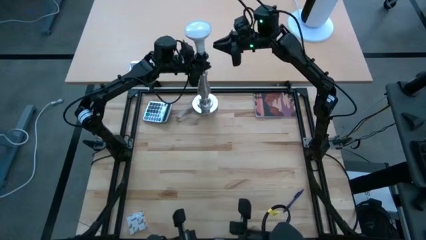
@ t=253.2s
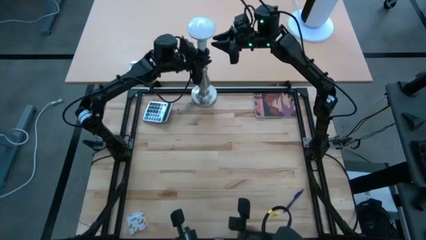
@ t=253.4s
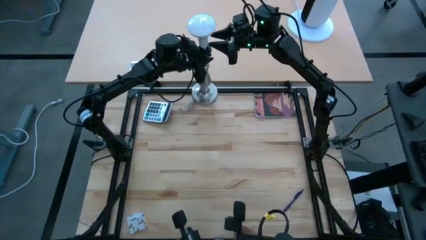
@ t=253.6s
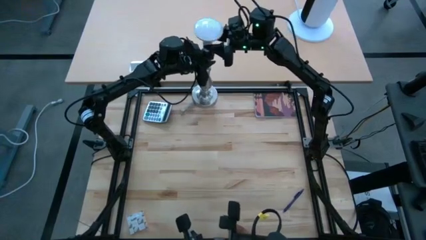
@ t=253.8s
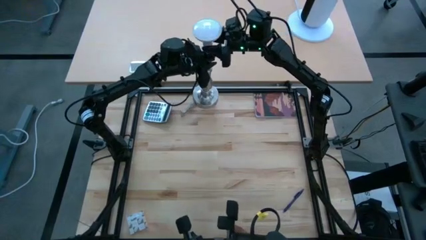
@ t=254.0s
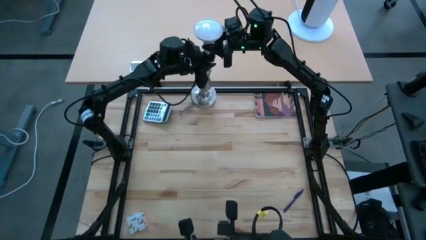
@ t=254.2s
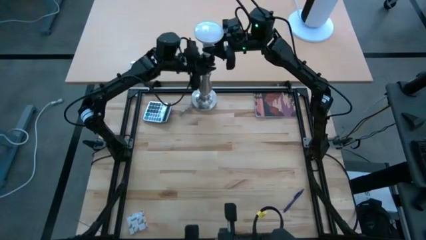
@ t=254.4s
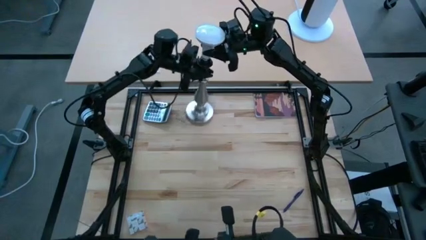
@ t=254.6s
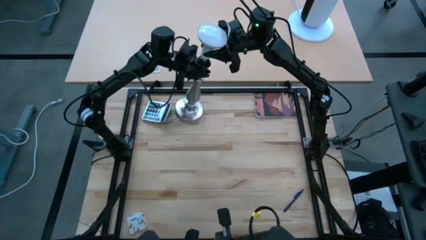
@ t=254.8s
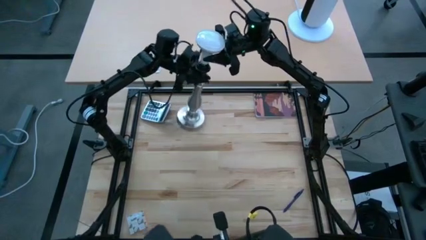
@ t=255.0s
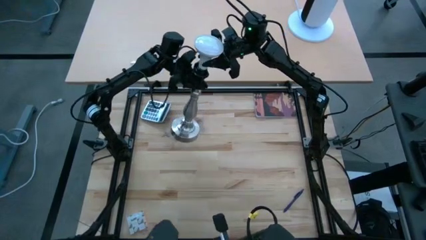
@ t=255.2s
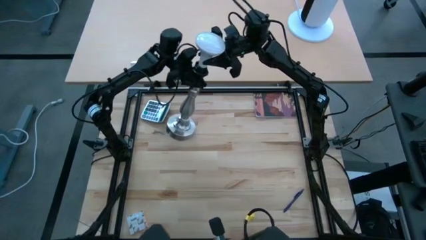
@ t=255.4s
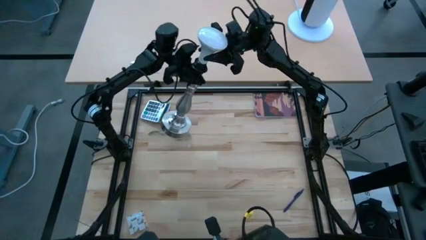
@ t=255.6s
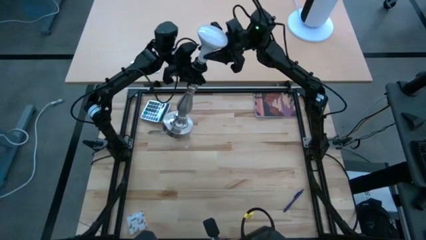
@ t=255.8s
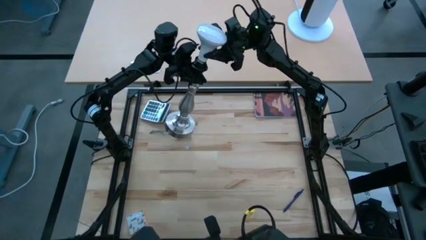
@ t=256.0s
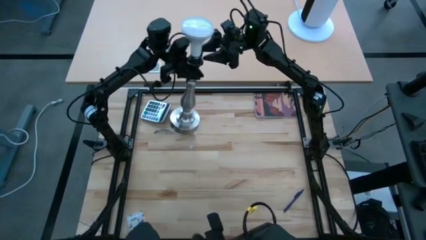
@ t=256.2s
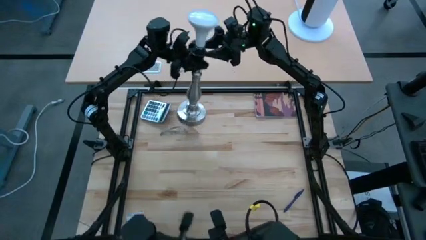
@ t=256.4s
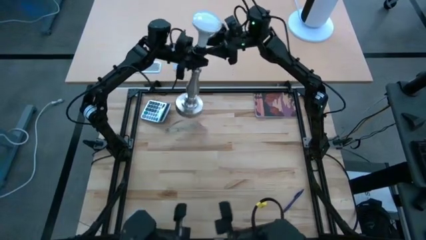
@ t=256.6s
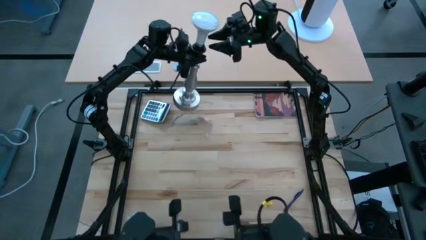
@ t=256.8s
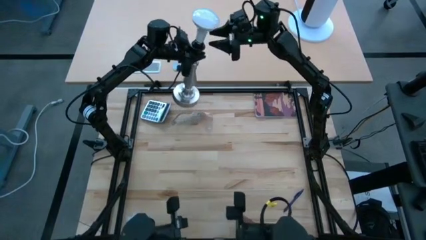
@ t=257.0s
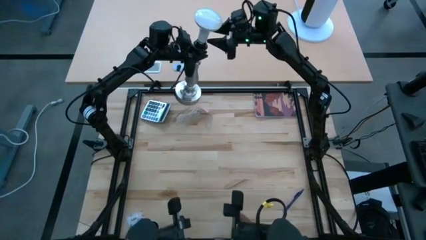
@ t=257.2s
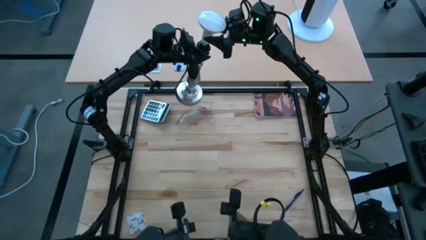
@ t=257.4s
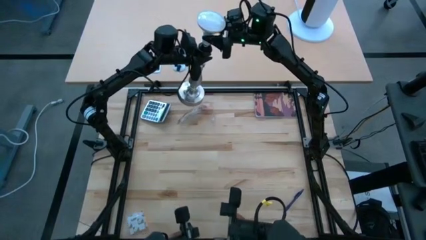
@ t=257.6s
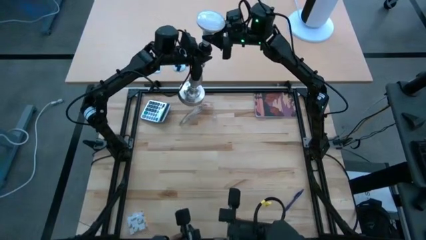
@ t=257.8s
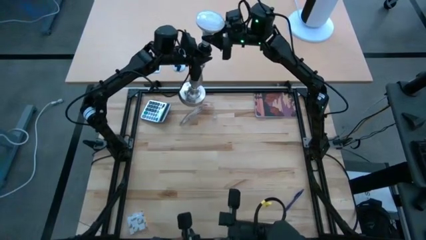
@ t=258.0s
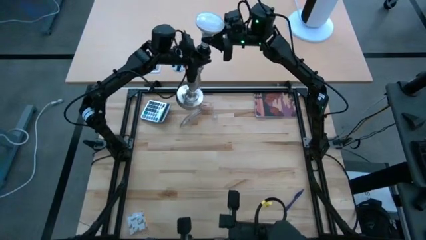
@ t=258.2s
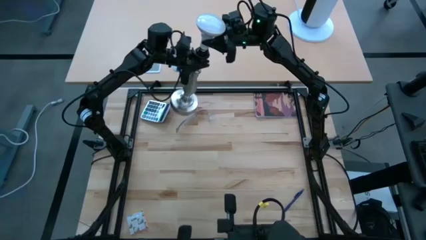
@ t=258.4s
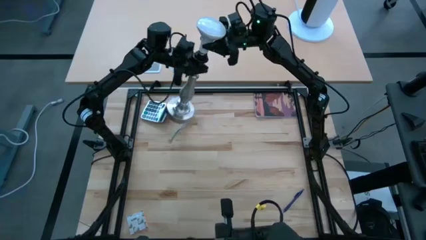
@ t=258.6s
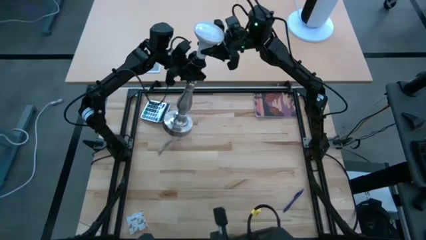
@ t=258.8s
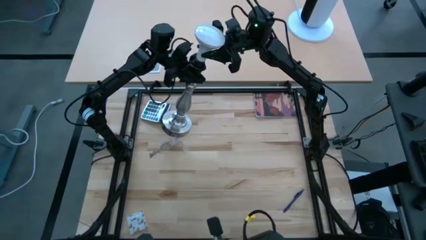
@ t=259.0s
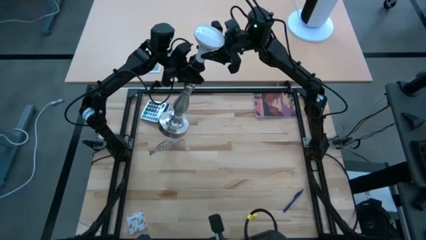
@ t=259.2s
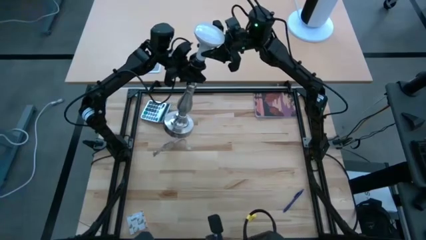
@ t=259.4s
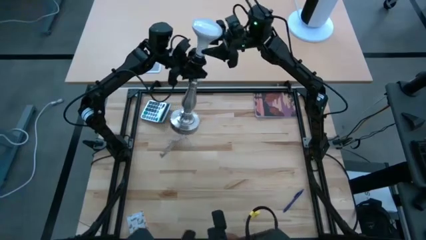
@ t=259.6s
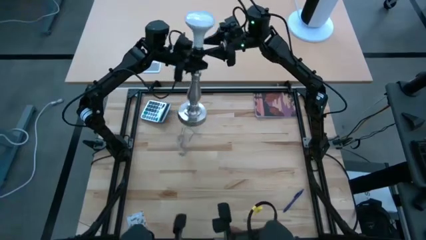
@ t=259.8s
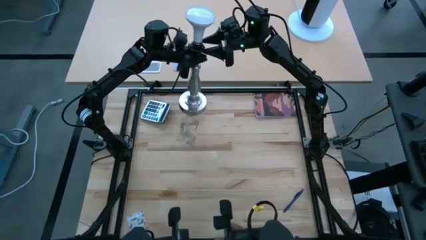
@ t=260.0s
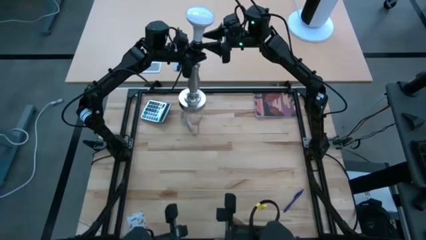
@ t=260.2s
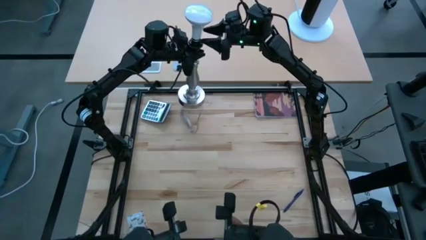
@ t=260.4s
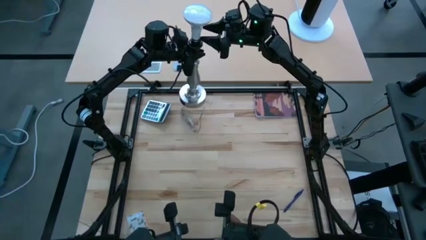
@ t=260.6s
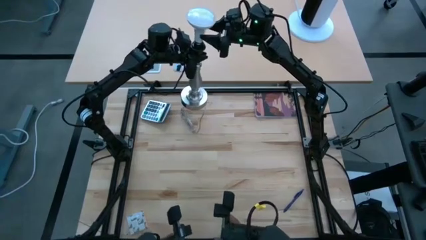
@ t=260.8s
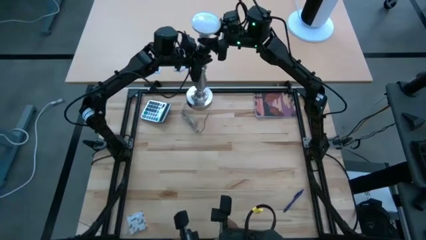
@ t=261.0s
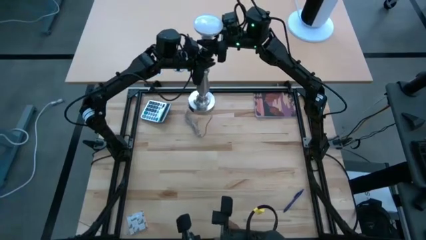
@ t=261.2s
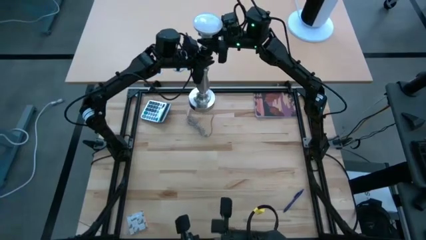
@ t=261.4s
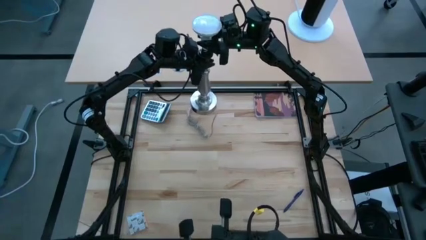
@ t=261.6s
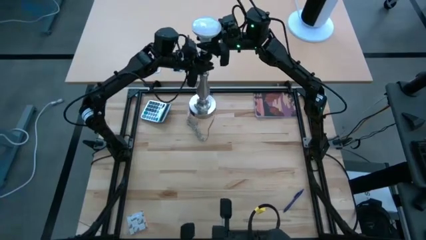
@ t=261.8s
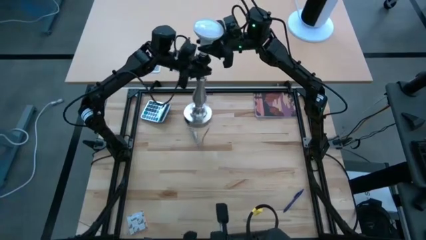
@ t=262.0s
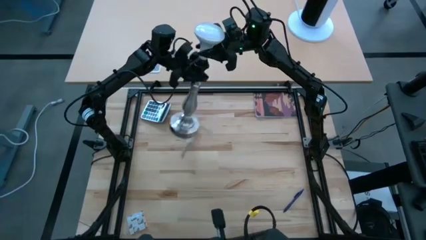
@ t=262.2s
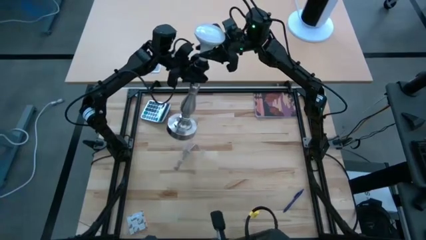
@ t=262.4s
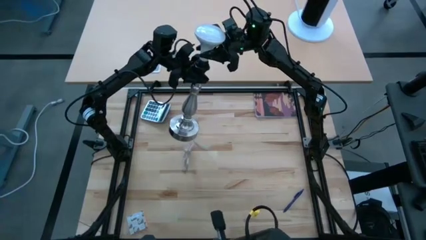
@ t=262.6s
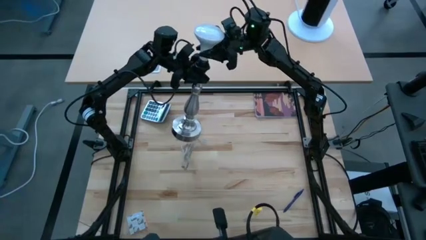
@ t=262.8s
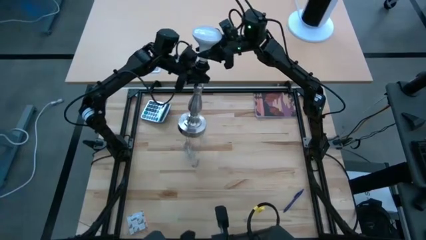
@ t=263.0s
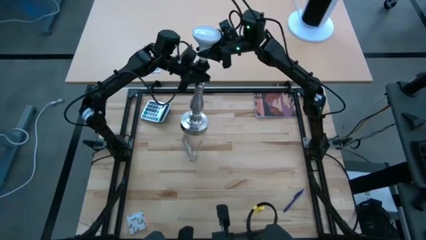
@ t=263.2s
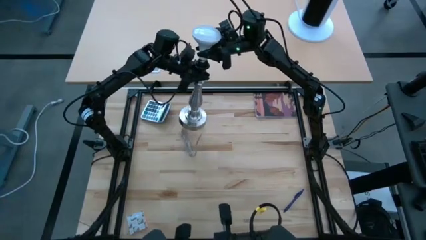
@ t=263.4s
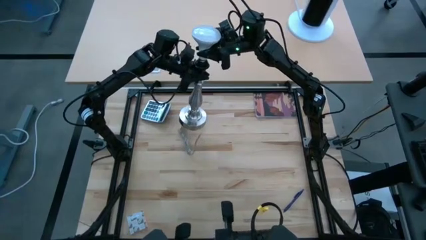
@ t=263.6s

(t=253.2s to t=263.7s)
Task: Screw lightbulb
Remove the lightbulb from the table lamp

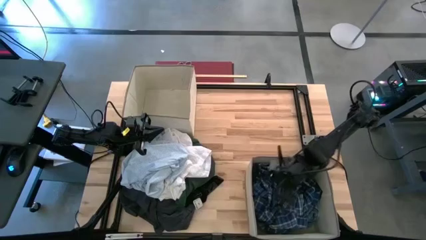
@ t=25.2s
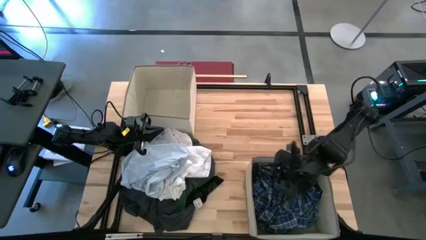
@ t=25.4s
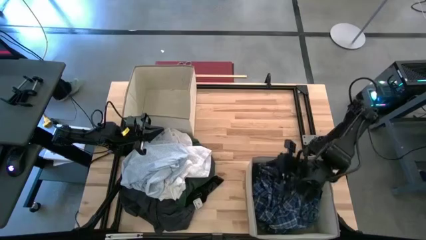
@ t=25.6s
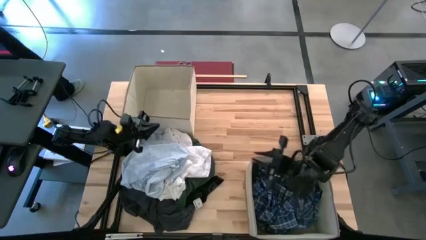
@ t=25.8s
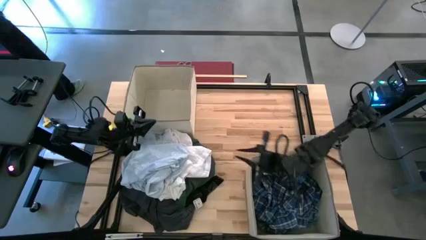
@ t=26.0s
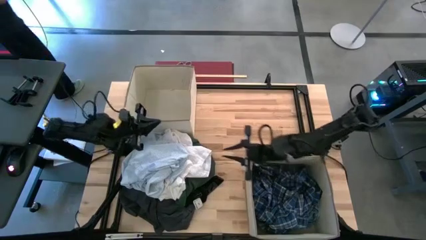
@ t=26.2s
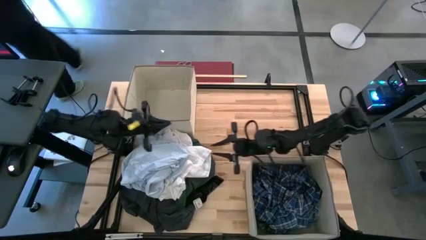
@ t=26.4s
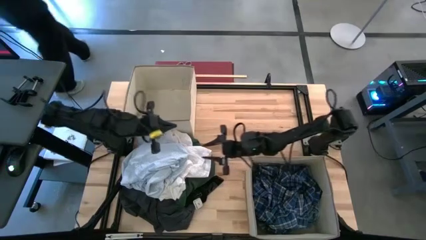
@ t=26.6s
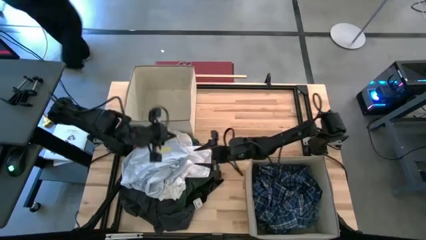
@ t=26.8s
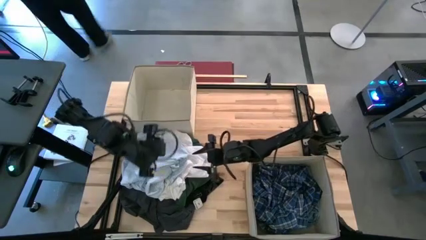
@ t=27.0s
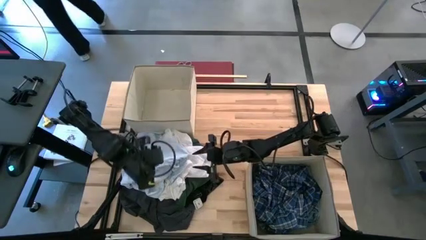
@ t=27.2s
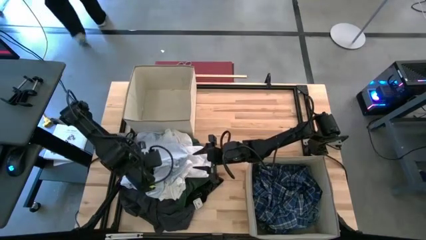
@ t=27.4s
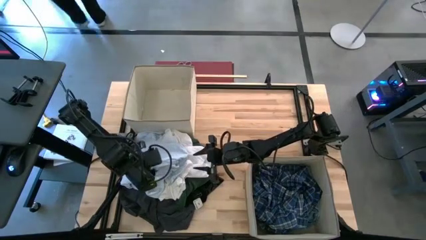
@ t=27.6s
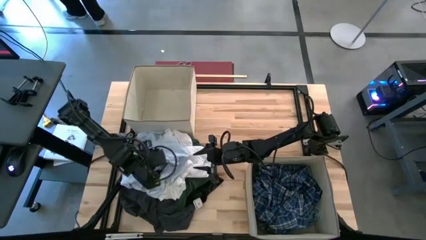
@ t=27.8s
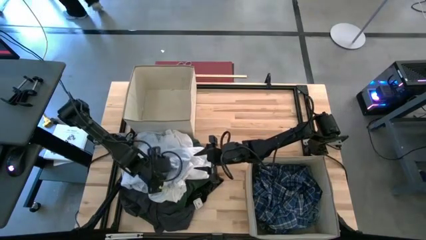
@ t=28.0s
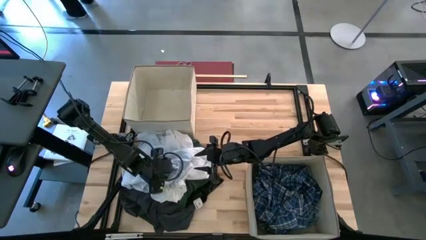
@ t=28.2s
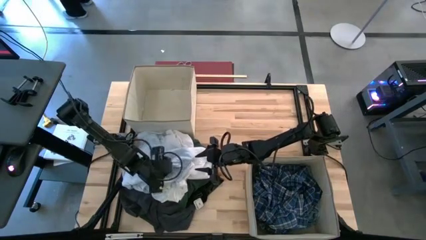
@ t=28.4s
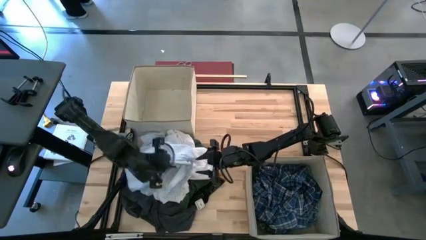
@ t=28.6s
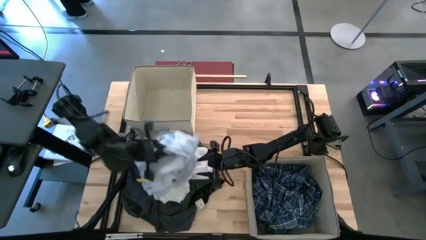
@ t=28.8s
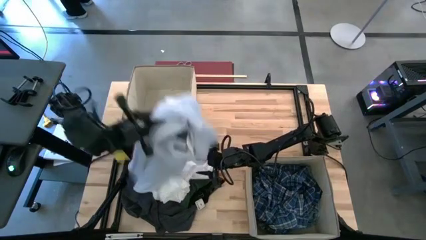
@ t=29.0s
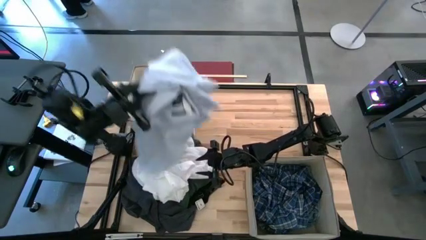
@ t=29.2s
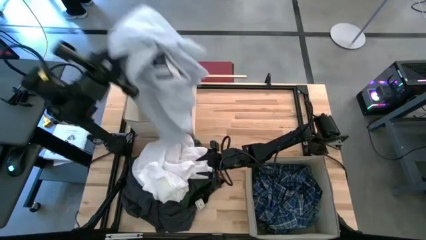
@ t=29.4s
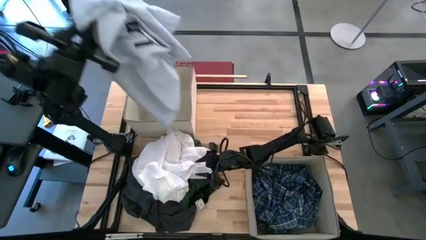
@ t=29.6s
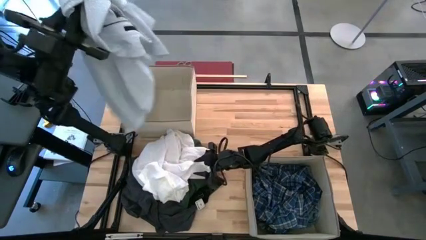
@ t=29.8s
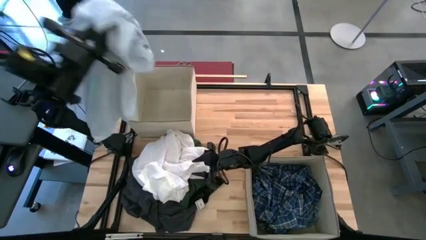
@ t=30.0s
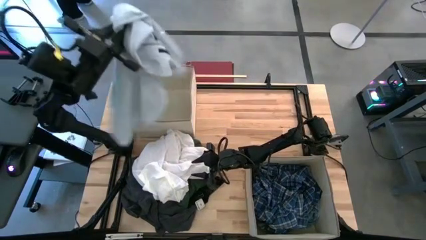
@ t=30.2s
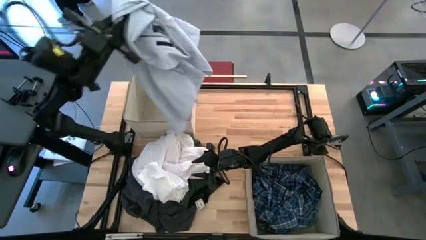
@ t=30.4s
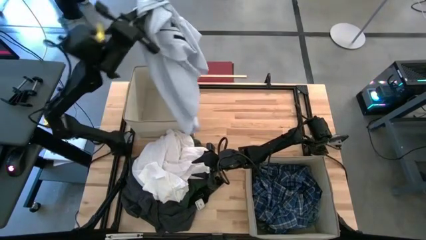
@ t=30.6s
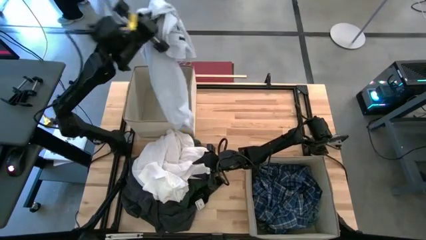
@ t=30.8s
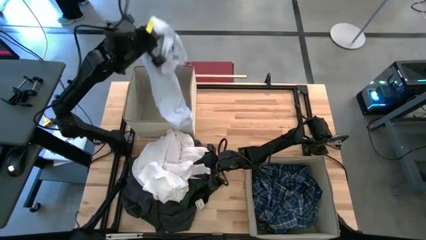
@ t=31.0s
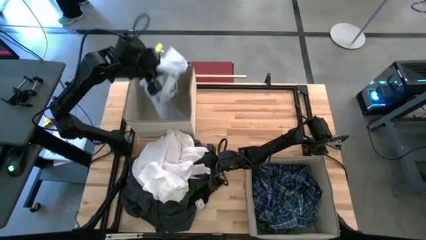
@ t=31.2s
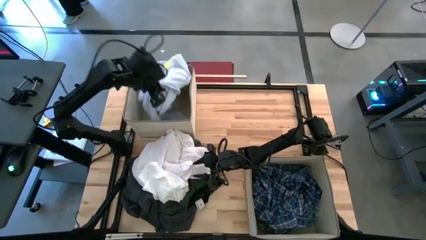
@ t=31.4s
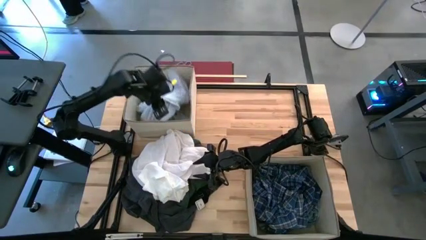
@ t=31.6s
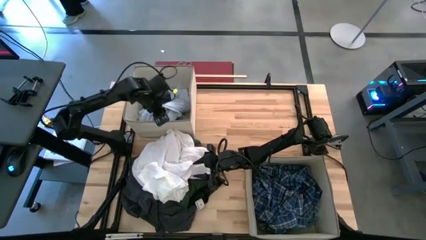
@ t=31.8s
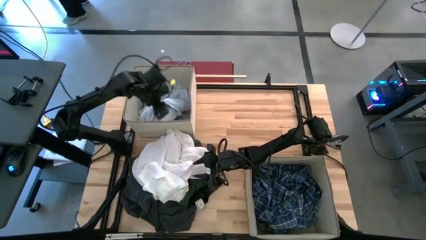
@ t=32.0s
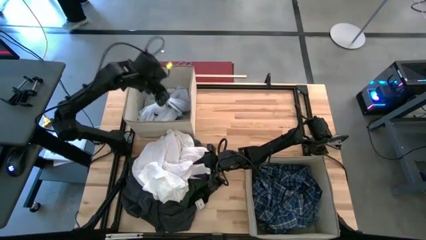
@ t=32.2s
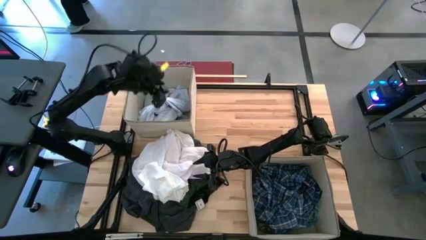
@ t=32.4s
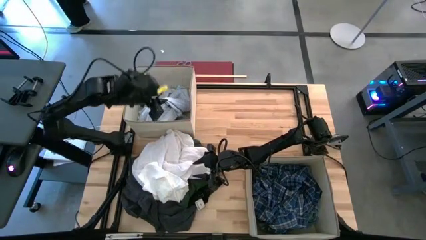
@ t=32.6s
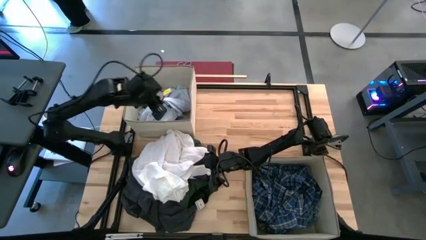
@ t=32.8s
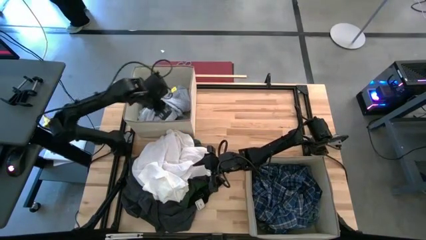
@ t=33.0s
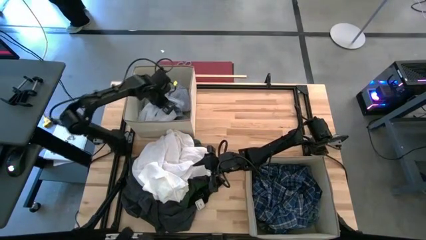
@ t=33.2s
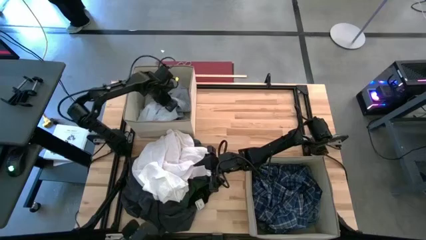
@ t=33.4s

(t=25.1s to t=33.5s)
Task: Sort clothes
Put the blue shirt into the top laundry bin
